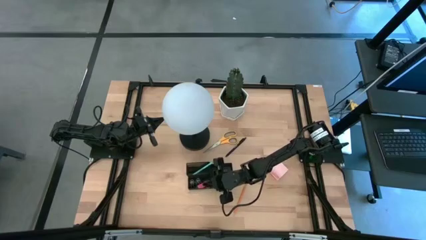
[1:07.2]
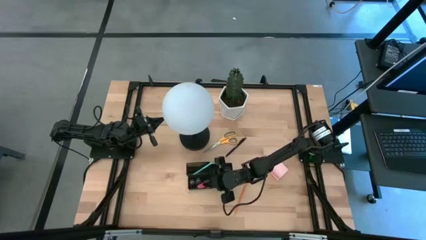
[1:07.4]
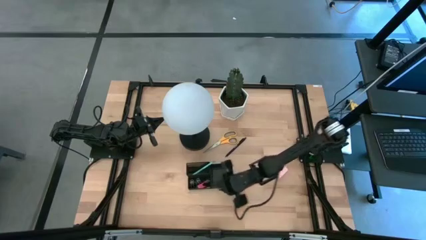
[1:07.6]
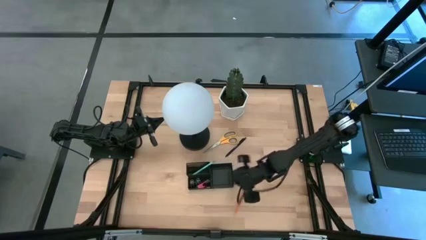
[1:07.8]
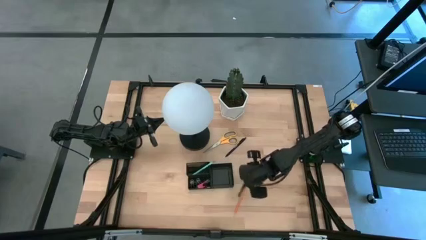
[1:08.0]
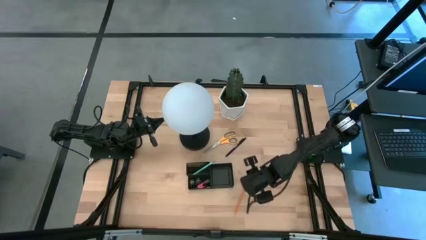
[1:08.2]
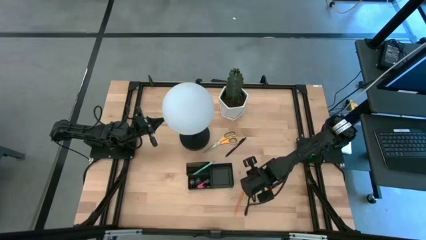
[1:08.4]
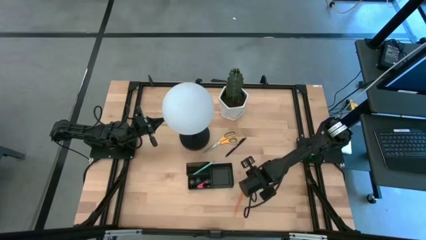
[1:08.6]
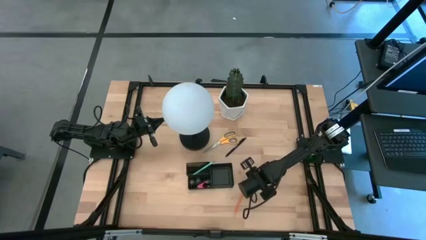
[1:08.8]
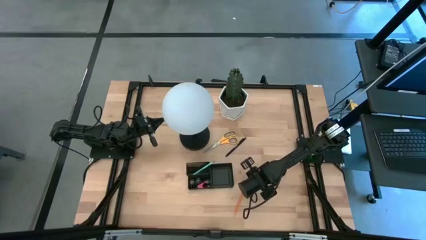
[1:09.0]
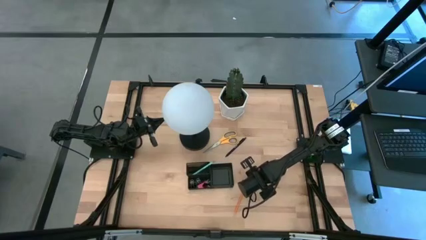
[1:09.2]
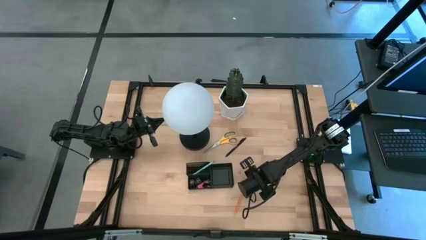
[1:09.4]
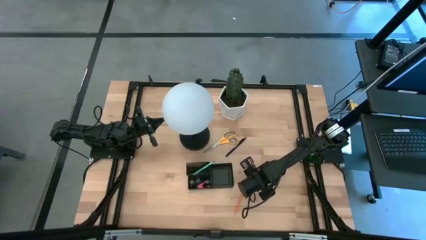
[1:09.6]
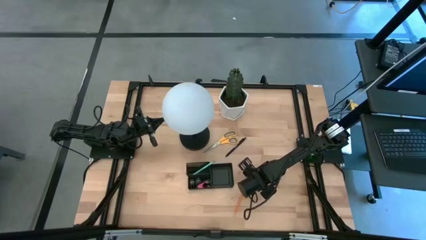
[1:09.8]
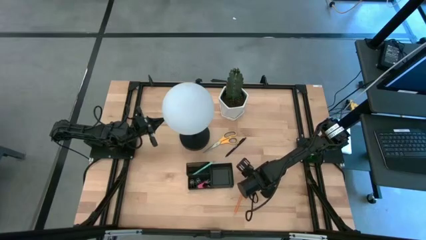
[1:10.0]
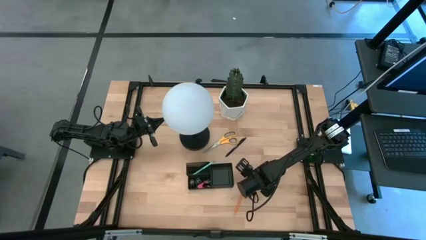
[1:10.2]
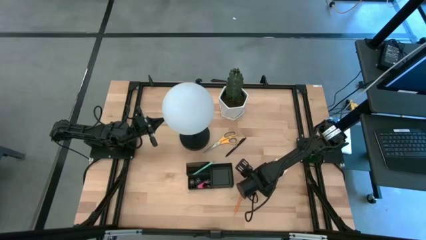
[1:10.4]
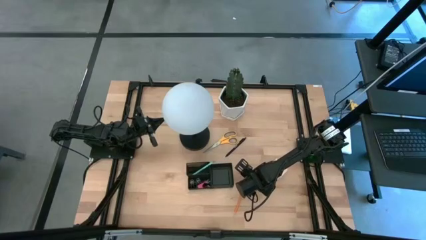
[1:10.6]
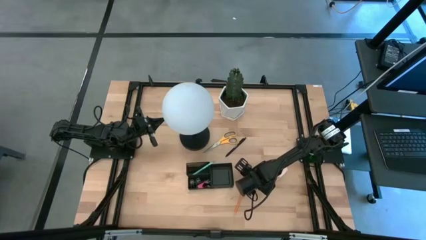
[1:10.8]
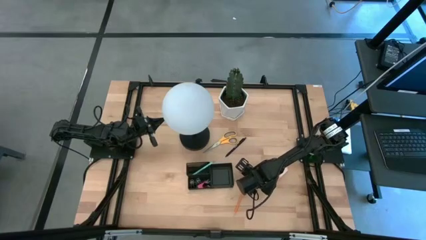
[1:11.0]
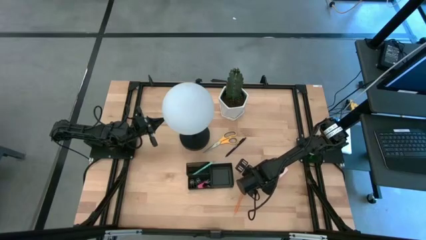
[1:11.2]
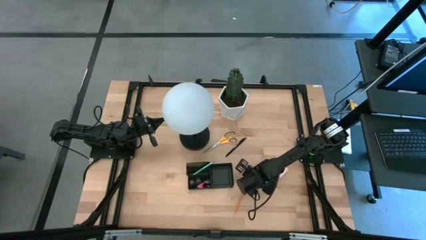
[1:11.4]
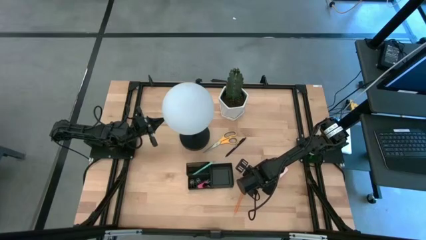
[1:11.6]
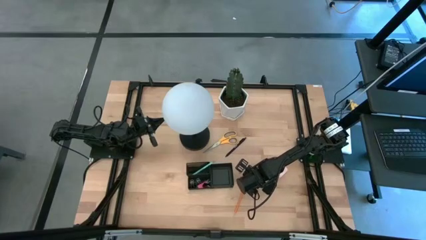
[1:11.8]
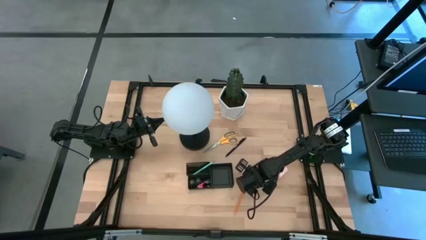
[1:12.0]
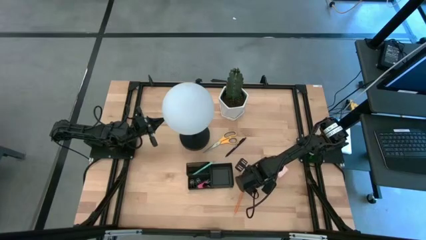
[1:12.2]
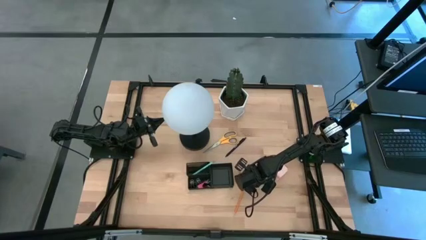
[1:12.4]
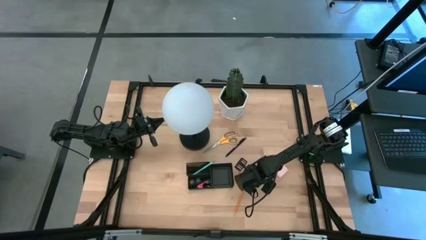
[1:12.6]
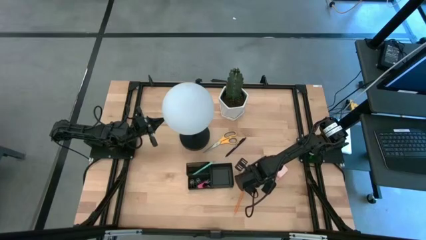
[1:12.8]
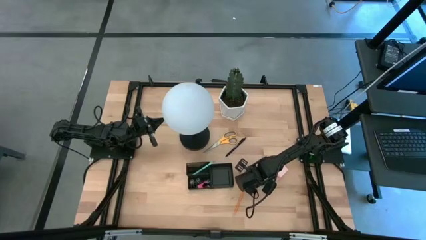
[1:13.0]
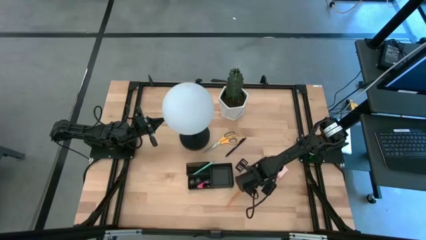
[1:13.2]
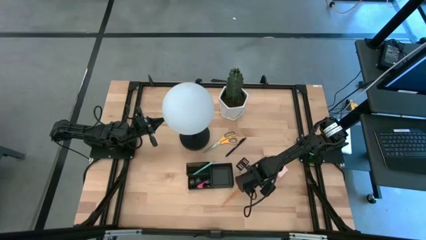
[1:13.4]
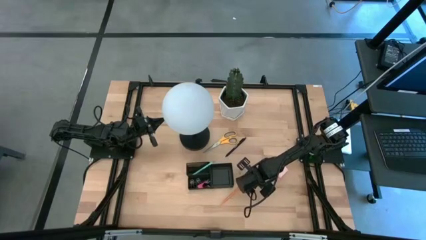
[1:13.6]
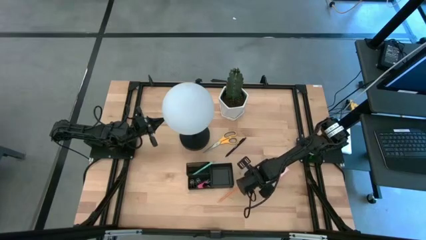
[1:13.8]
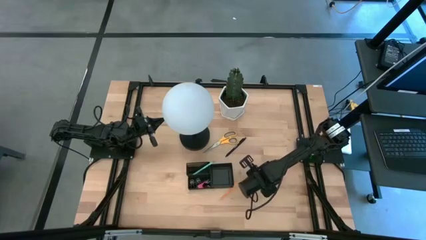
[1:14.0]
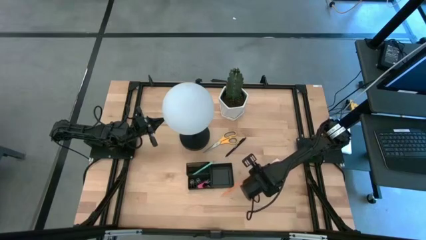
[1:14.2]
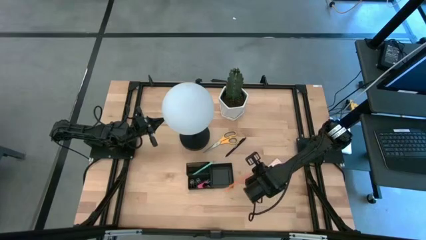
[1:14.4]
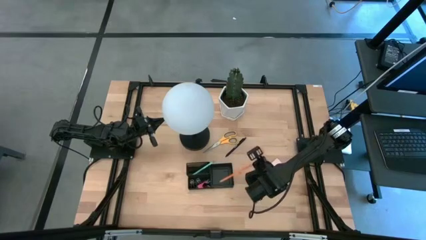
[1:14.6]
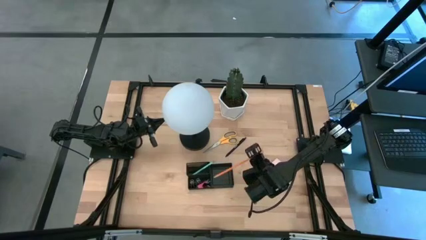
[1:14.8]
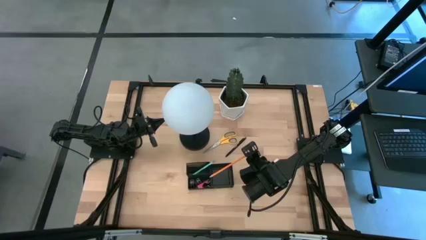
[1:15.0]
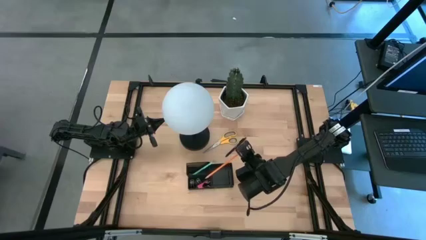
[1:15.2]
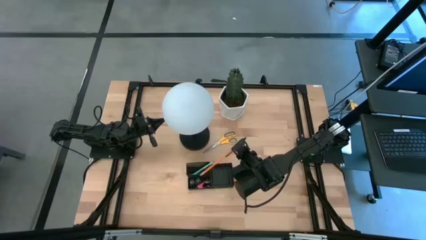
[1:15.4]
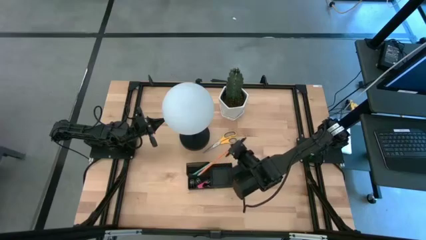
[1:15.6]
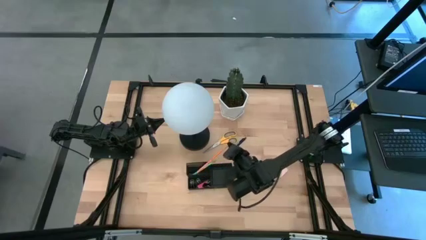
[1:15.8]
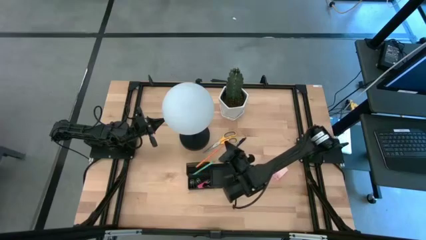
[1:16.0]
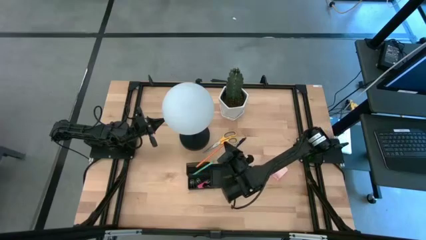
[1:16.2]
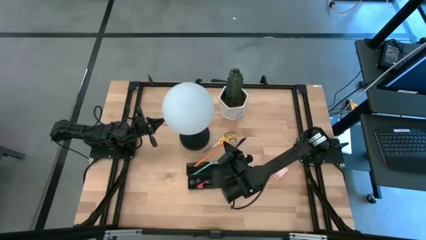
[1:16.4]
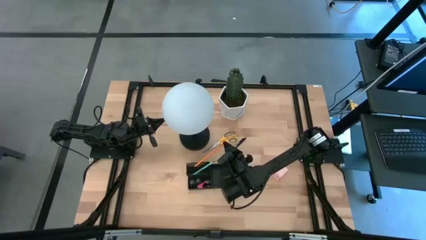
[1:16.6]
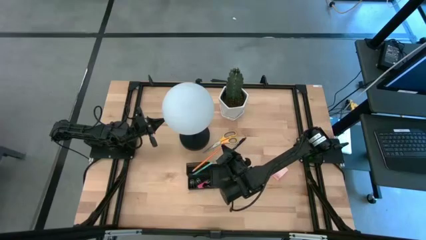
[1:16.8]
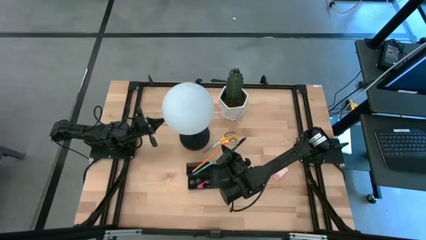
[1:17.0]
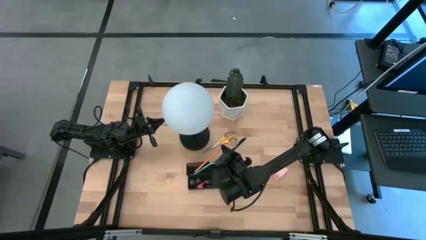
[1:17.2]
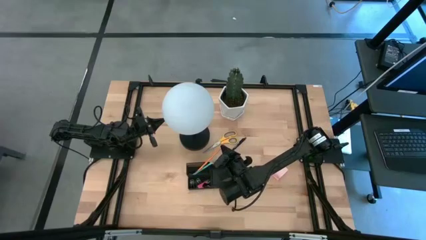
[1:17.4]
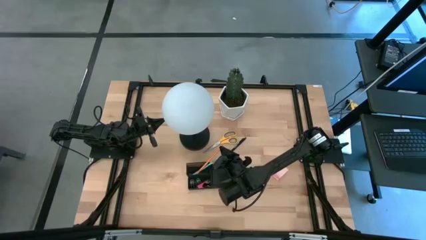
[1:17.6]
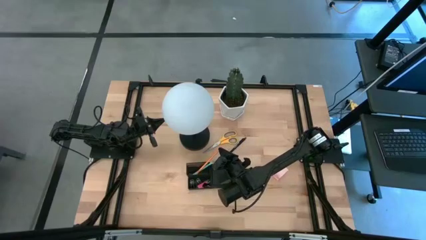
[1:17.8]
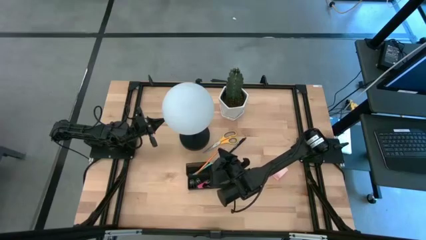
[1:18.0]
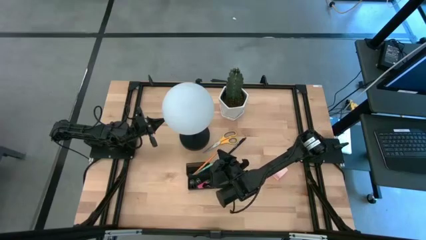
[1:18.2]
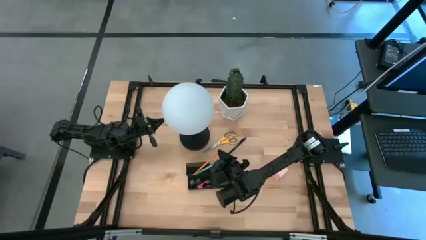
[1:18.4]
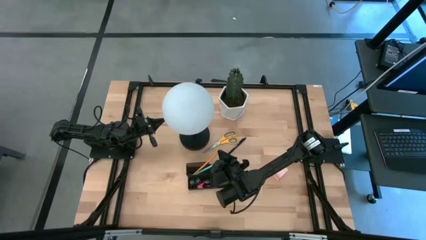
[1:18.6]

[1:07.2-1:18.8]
Task: Pick and place office supplies into organizer
Put the orange pencil into the desk organizer
